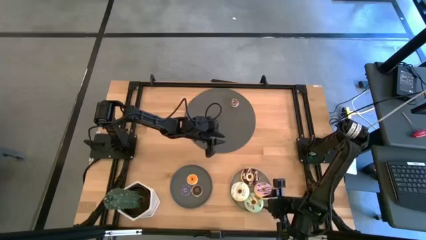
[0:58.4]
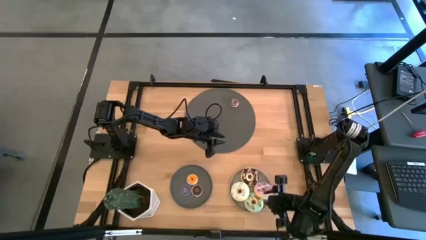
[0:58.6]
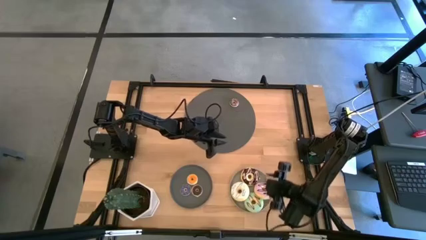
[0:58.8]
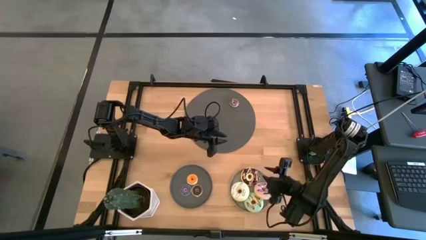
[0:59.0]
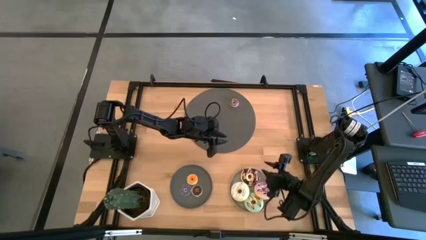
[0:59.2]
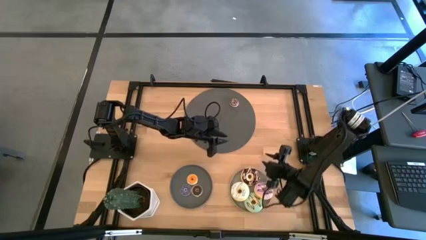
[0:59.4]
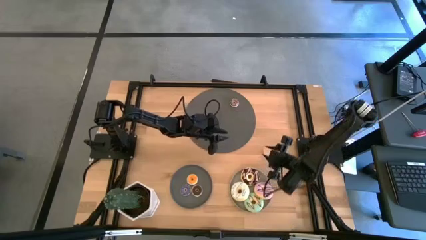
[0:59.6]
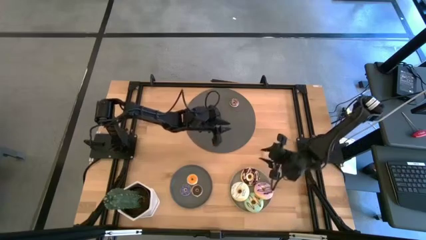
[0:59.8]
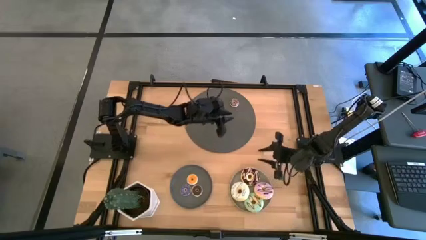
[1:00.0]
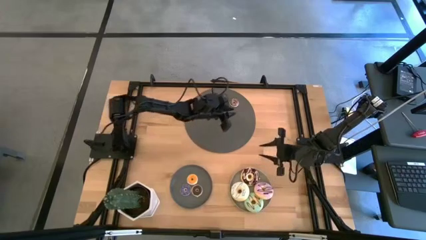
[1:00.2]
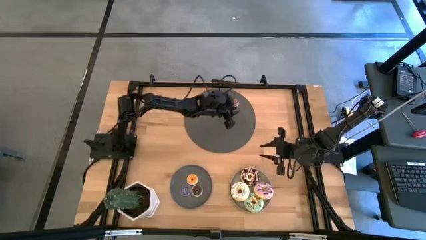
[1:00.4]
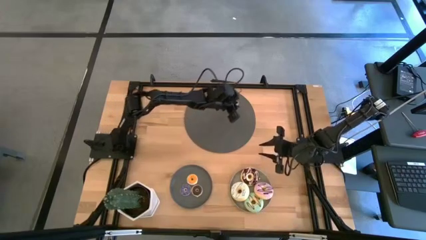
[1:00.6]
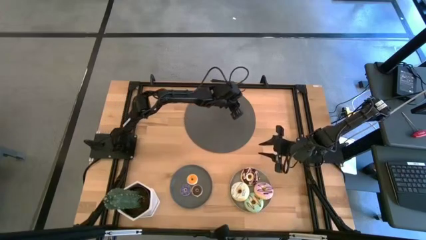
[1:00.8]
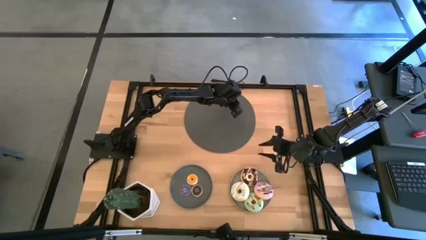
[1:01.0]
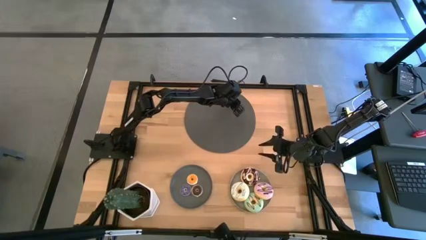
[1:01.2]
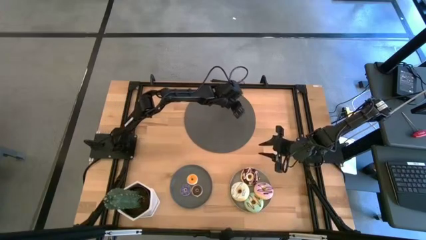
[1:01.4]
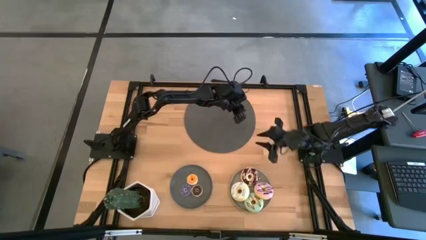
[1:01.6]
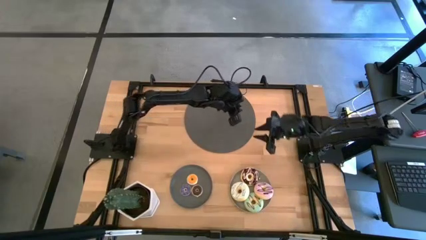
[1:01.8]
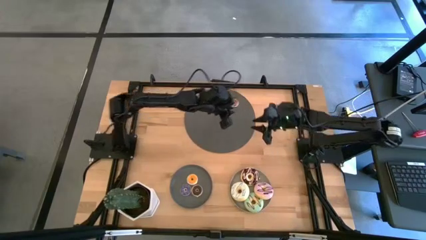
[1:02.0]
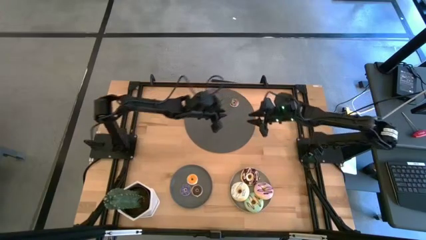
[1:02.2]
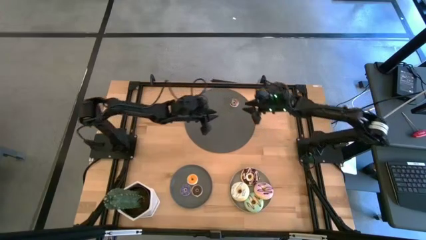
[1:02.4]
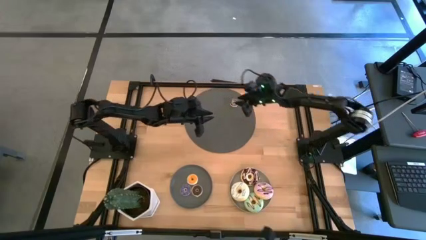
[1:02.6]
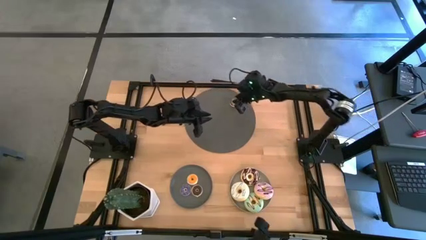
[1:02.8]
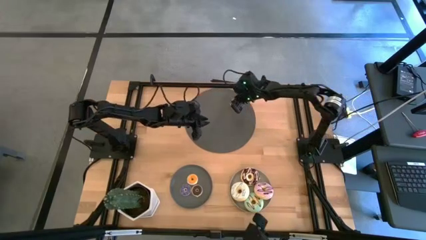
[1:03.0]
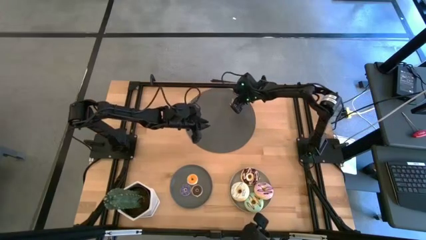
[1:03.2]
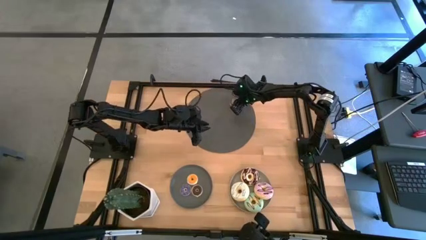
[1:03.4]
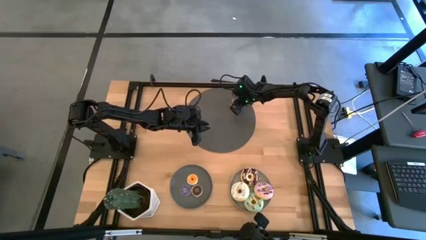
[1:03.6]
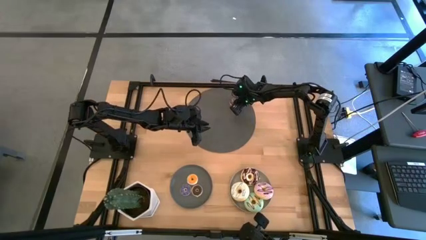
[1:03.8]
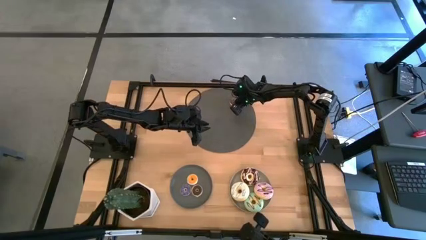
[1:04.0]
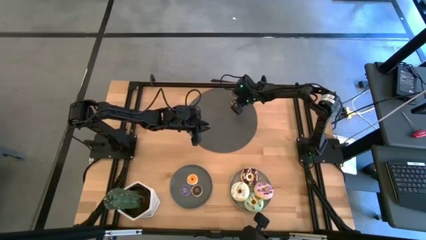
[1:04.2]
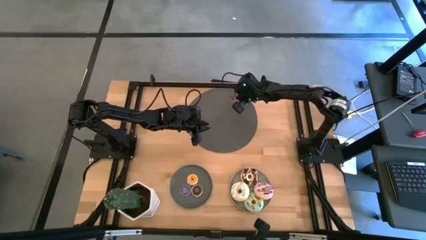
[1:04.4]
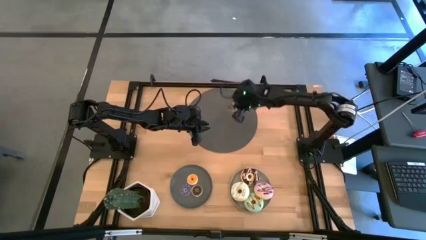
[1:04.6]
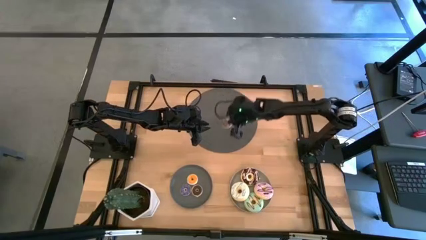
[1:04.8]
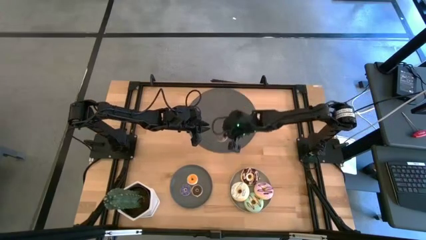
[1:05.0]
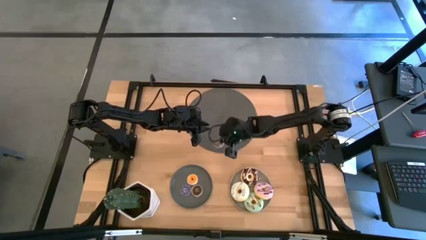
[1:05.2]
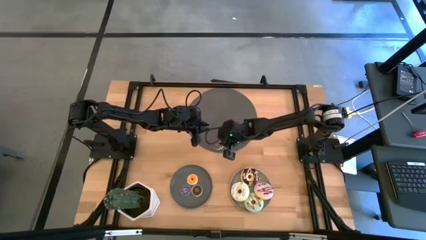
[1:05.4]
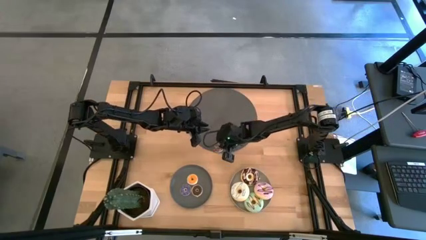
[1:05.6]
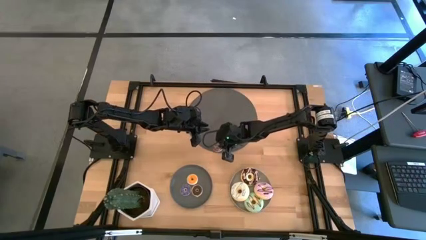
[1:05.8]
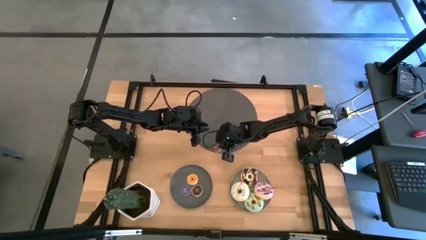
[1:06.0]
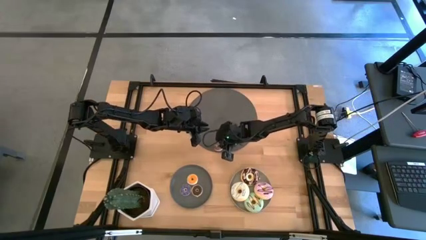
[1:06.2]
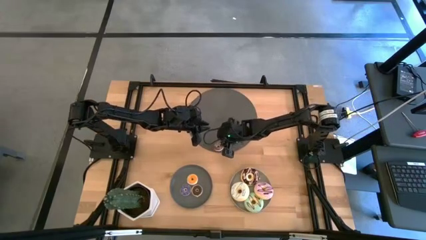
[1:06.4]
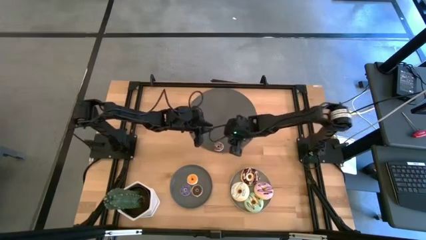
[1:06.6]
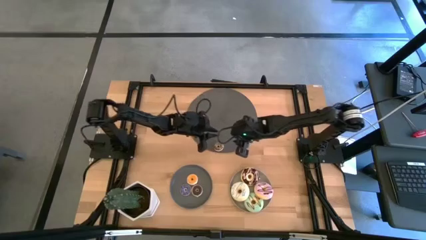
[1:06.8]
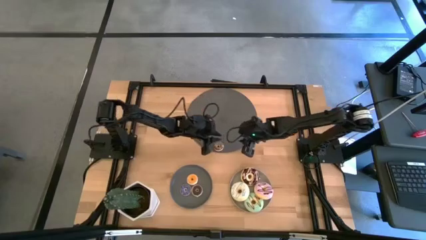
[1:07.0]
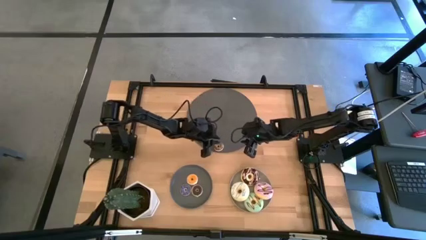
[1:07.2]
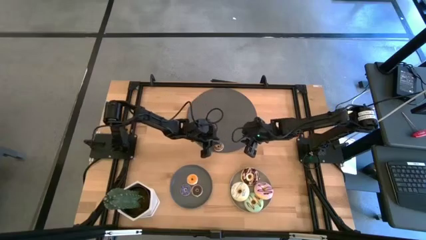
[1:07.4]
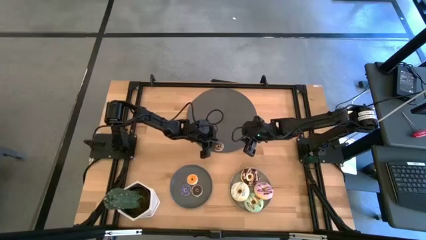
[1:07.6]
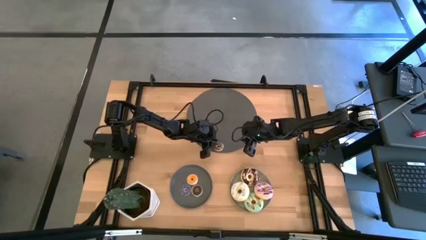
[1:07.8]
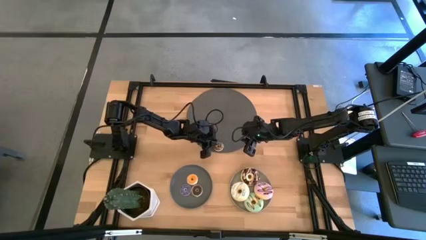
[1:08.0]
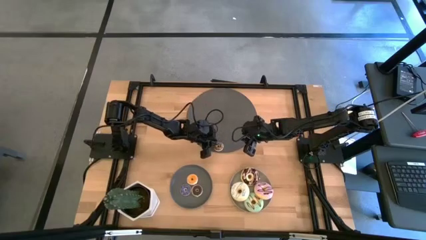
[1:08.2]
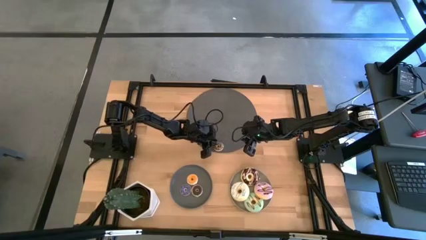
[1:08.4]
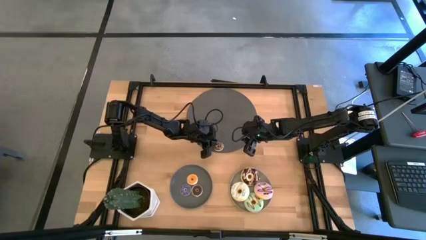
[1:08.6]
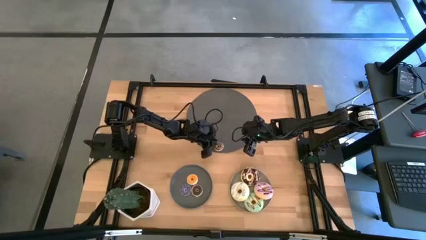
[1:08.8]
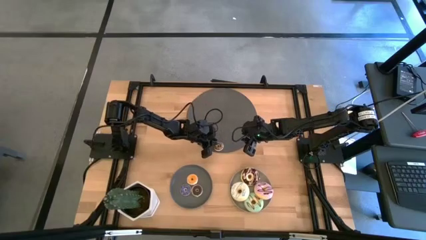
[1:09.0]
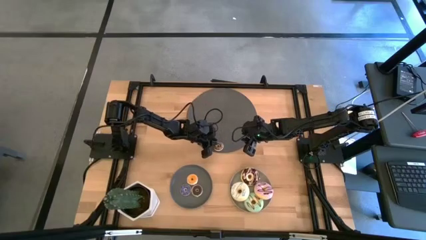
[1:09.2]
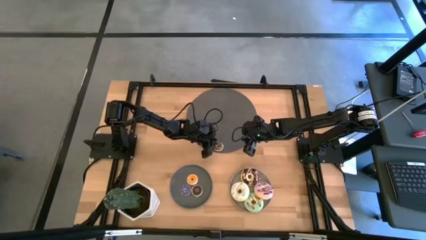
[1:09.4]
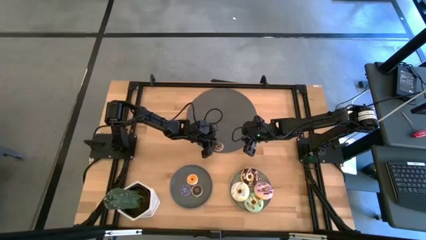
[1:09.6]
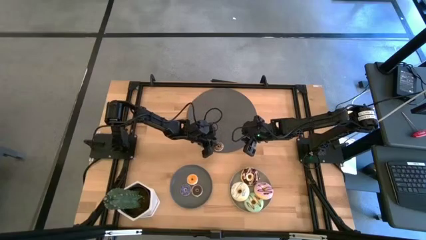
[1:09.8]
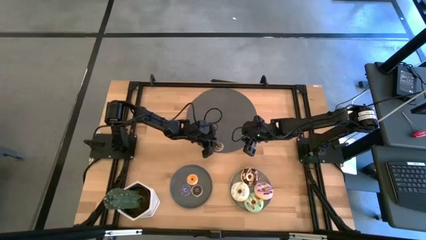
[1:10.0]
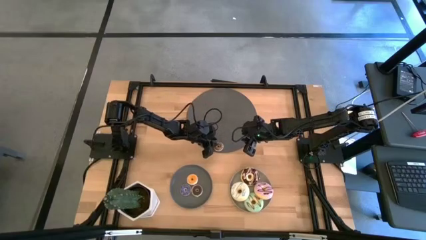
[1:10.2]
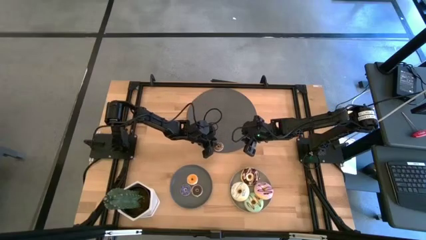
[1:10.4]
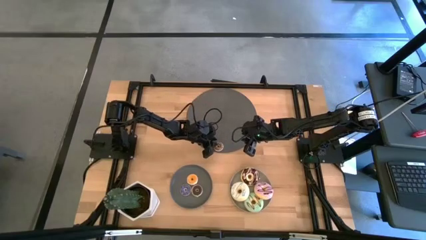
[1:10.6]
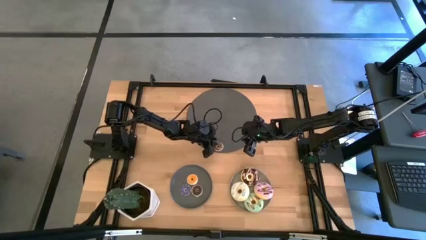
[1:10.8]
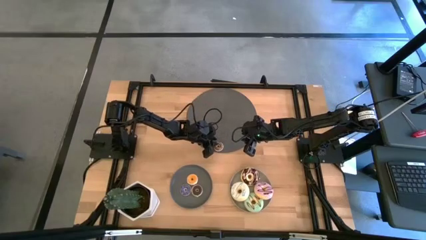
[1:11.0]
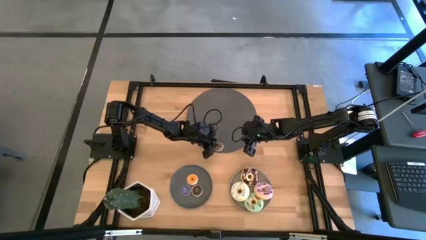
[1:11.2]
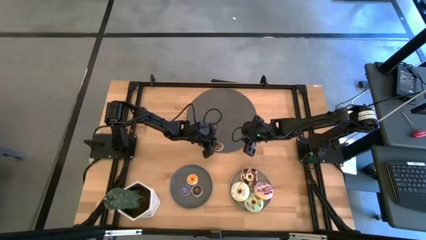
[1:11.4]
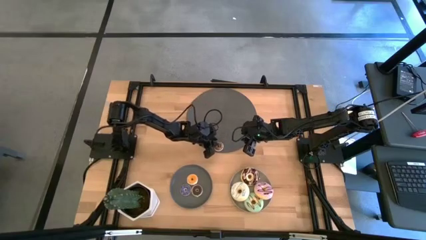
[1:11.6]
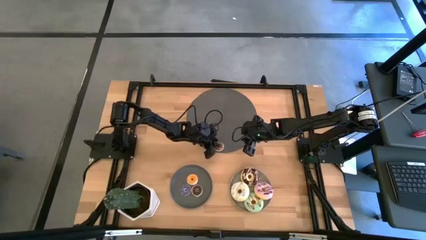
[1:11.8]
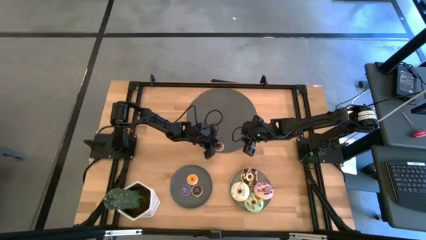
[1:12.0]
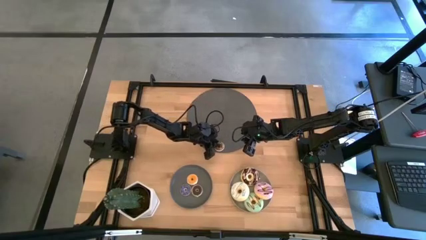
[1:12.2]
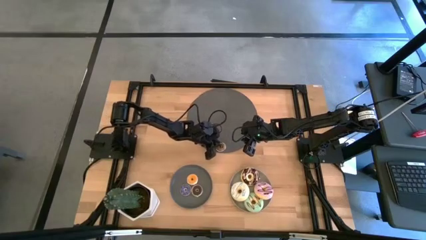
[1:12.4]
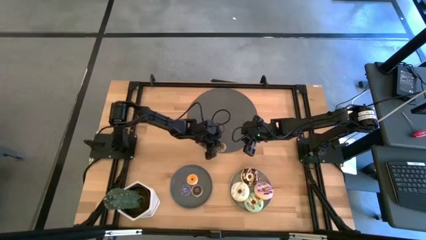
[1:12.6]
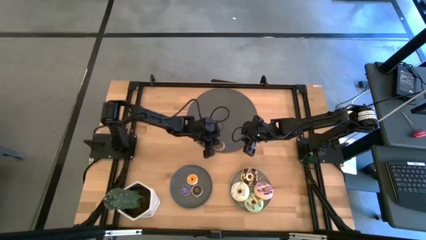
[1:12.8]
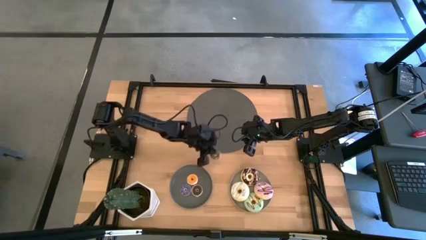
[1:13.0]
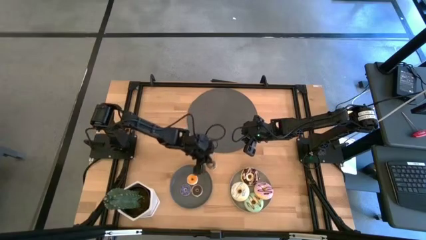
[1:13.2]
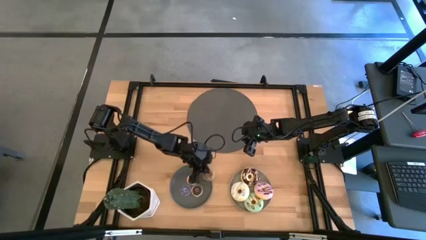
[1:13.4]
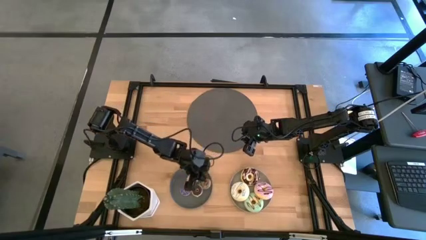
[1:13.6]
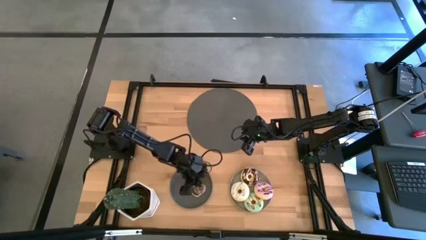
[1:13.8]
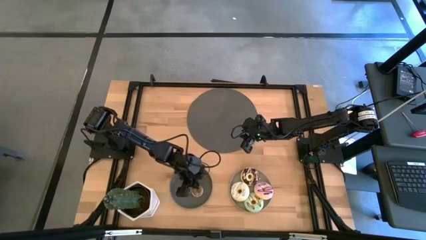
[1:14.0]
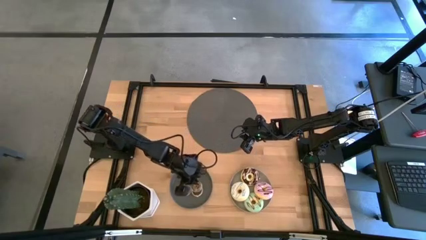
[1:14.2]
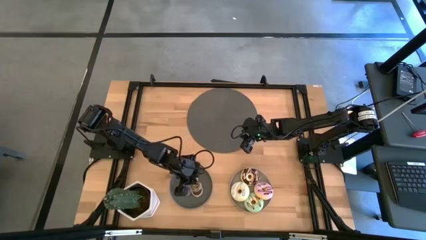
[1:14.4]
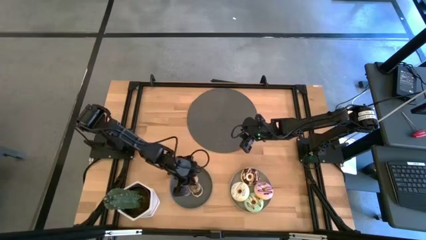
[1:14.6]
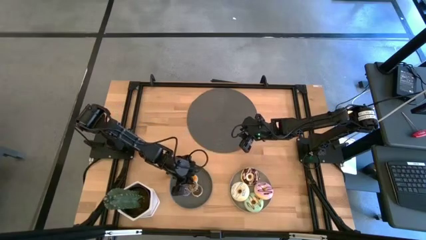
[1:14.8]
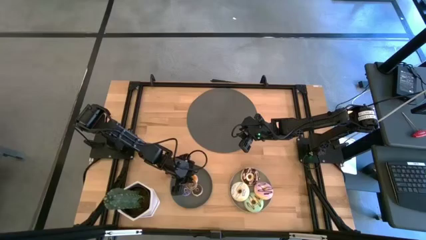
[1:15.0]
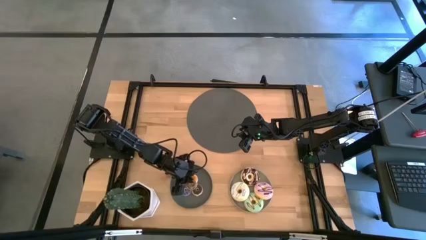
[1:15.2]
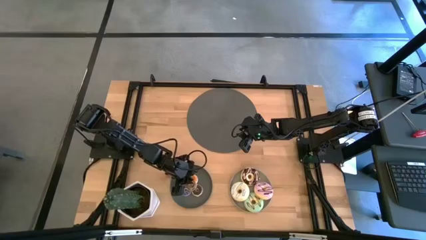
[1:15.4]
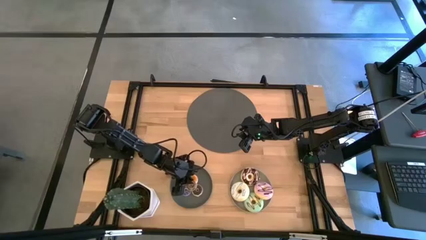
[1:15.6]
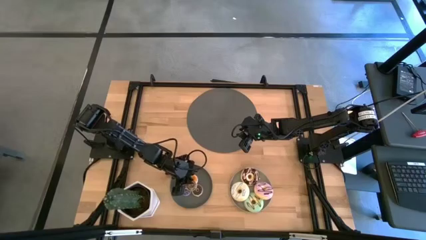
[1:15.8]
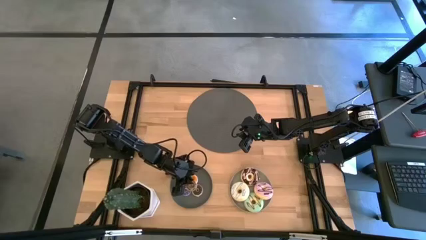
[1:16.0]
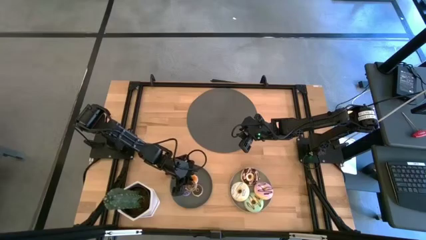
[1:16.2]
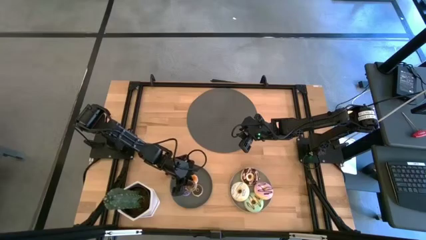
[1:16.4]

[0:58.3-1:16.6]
Task: Pick & Place donuts
Put small brown donut on the black plate
